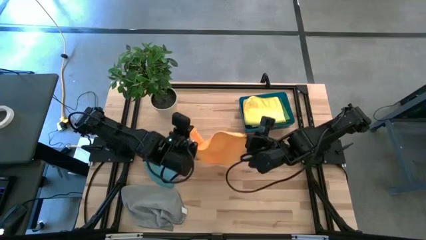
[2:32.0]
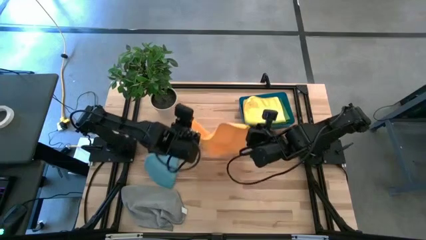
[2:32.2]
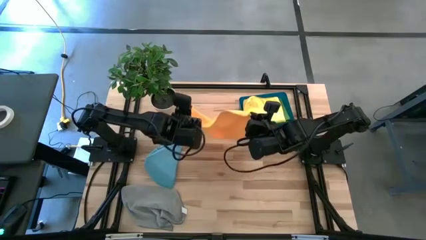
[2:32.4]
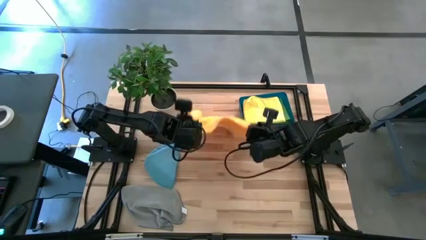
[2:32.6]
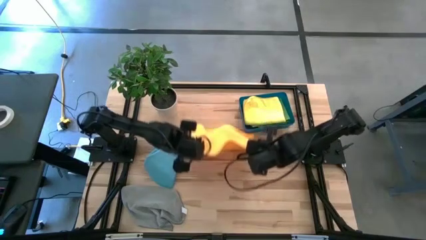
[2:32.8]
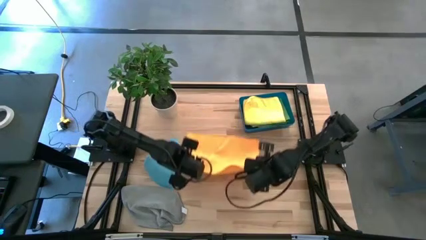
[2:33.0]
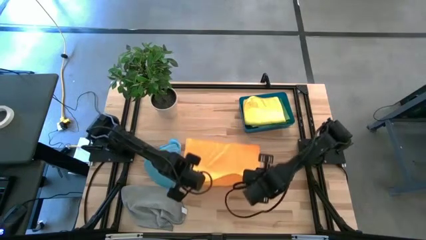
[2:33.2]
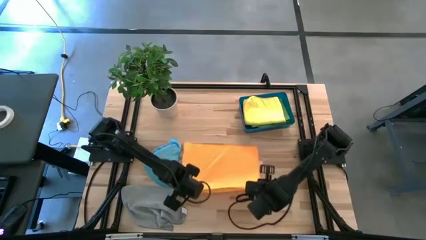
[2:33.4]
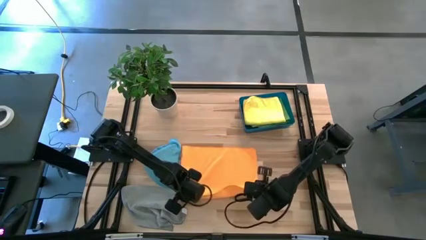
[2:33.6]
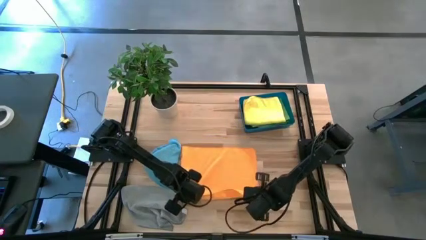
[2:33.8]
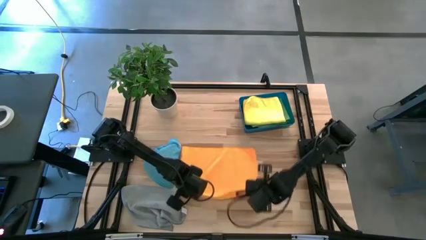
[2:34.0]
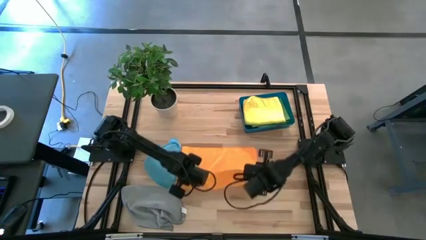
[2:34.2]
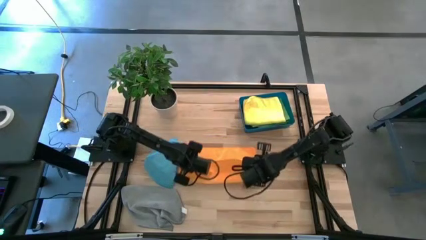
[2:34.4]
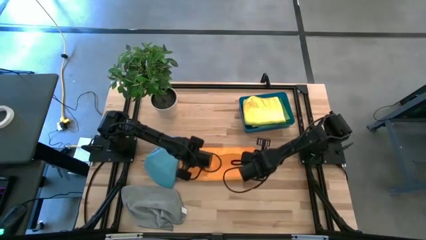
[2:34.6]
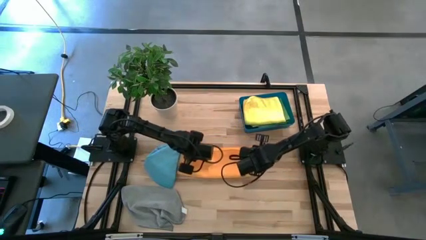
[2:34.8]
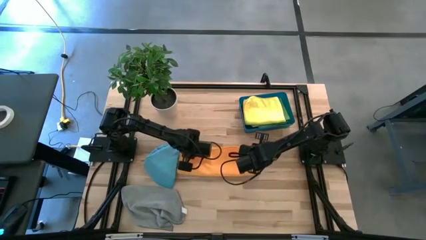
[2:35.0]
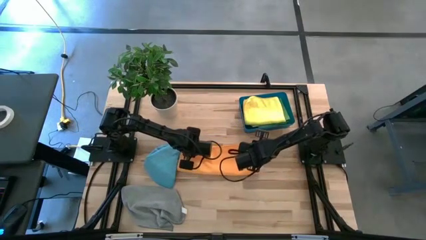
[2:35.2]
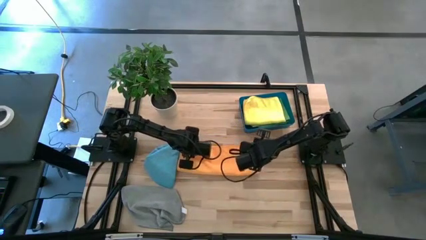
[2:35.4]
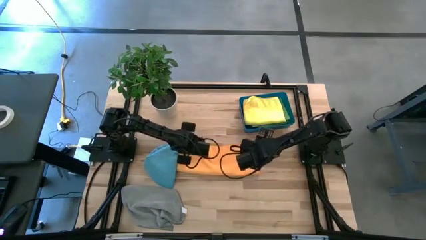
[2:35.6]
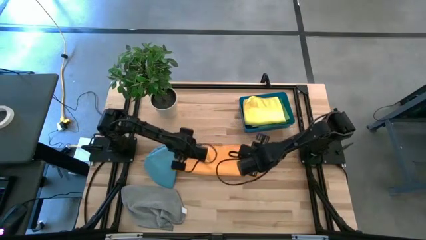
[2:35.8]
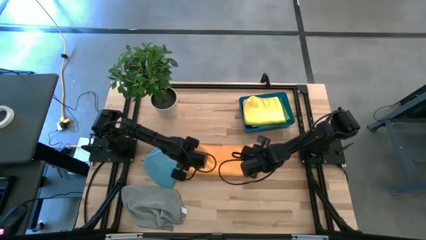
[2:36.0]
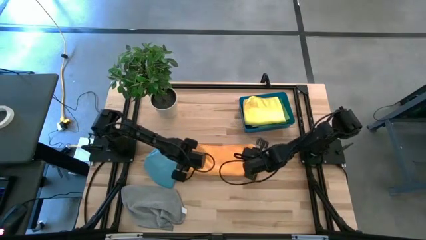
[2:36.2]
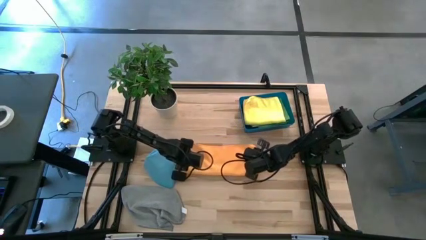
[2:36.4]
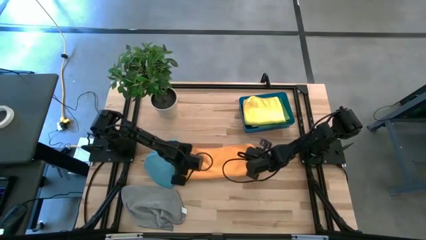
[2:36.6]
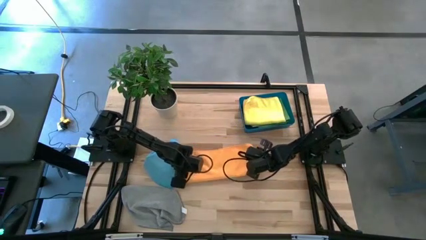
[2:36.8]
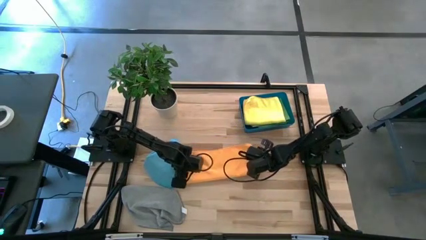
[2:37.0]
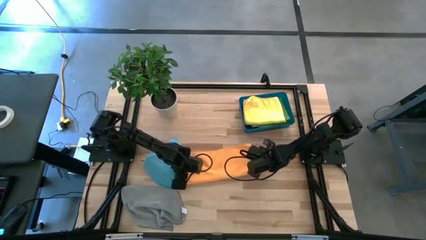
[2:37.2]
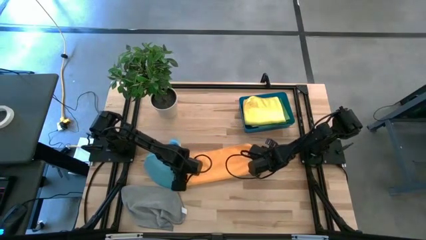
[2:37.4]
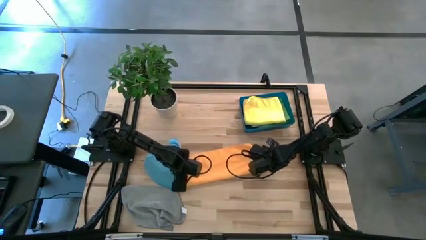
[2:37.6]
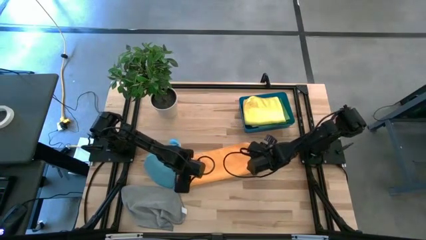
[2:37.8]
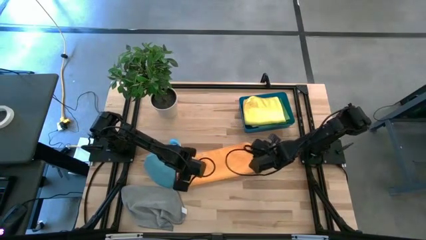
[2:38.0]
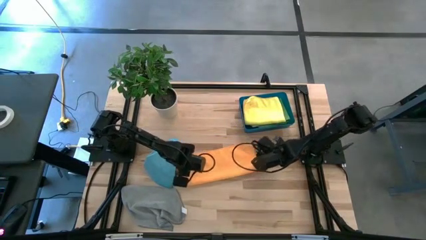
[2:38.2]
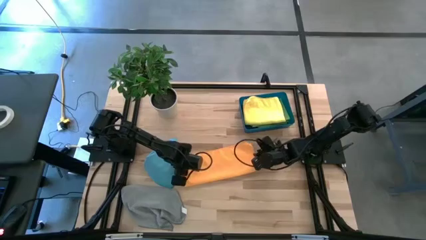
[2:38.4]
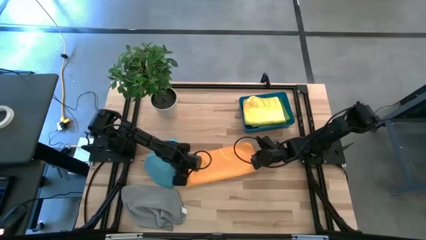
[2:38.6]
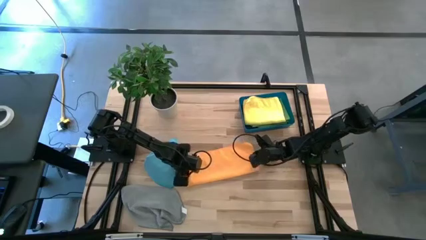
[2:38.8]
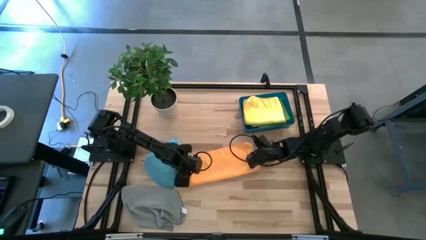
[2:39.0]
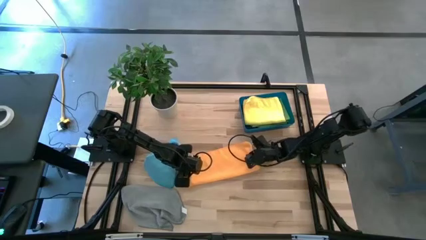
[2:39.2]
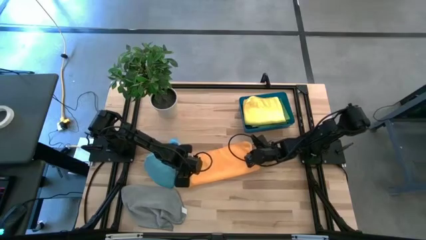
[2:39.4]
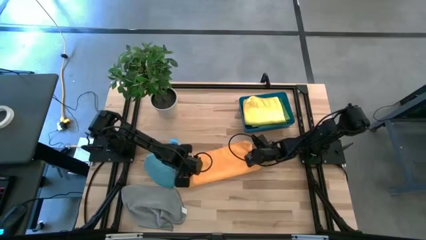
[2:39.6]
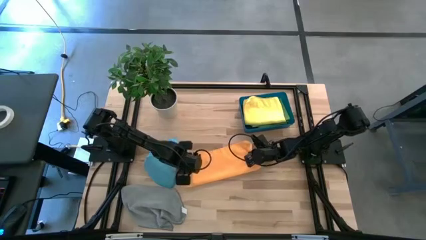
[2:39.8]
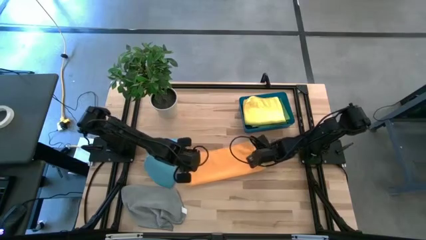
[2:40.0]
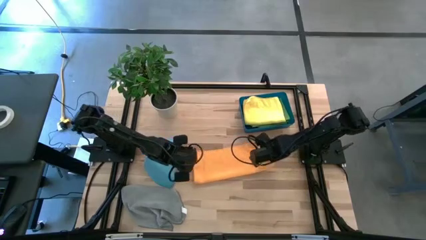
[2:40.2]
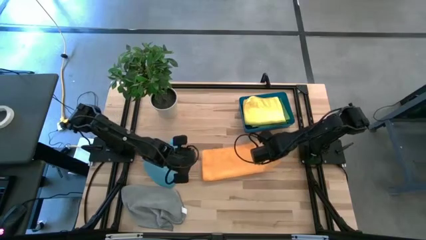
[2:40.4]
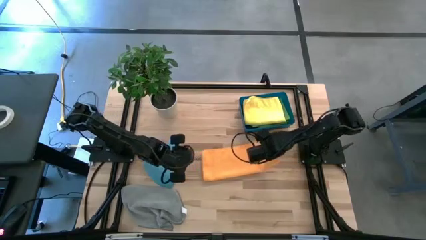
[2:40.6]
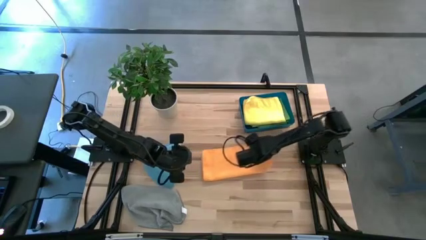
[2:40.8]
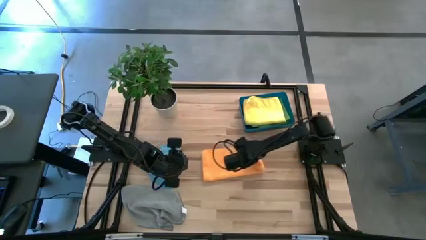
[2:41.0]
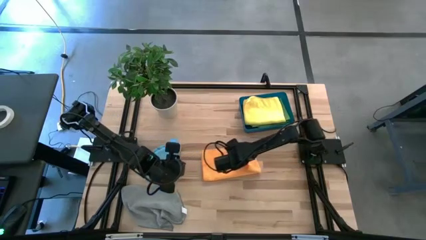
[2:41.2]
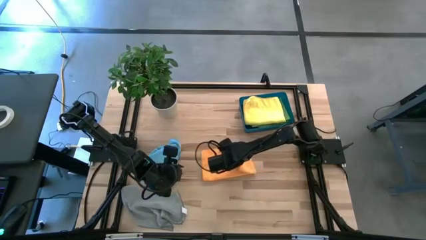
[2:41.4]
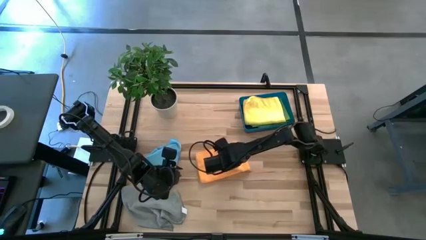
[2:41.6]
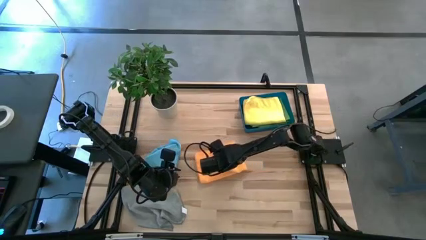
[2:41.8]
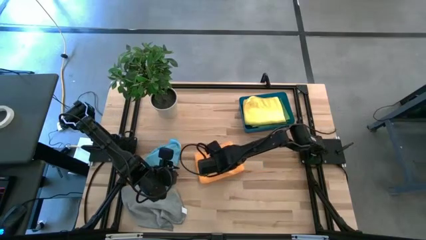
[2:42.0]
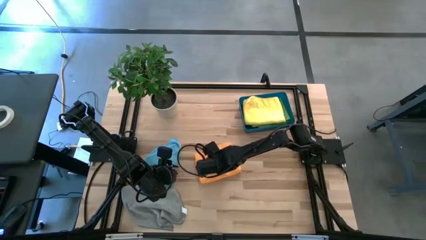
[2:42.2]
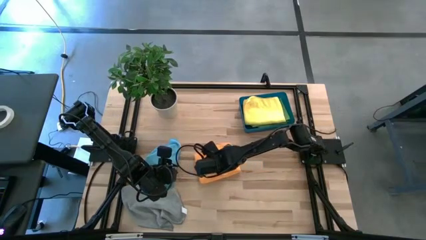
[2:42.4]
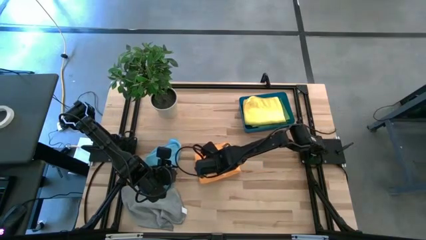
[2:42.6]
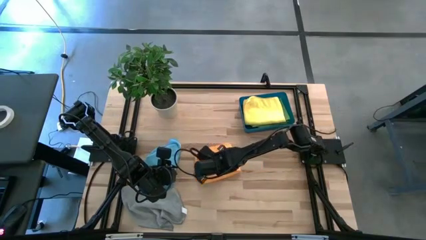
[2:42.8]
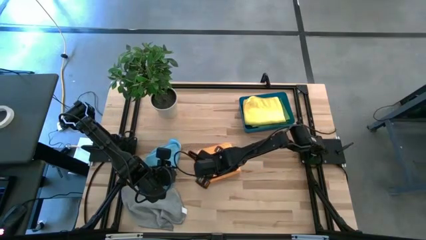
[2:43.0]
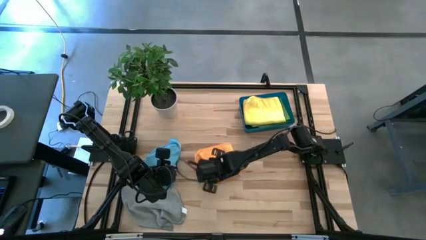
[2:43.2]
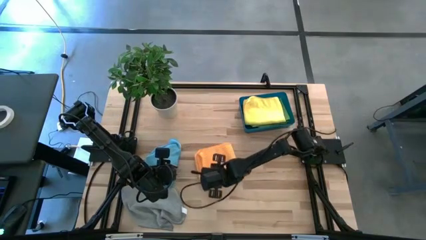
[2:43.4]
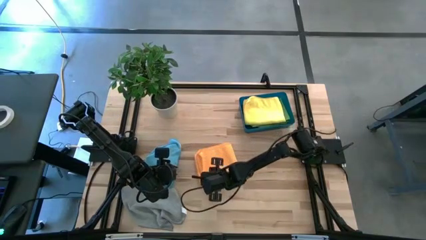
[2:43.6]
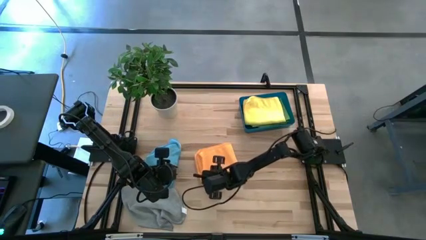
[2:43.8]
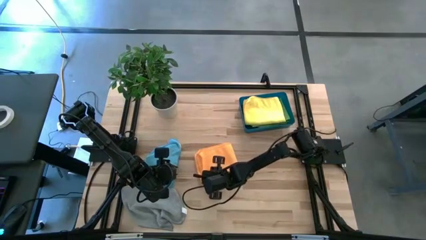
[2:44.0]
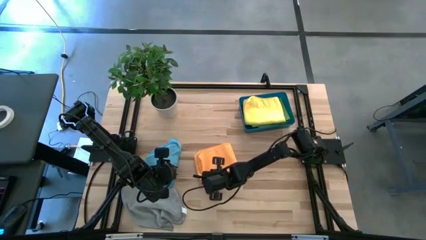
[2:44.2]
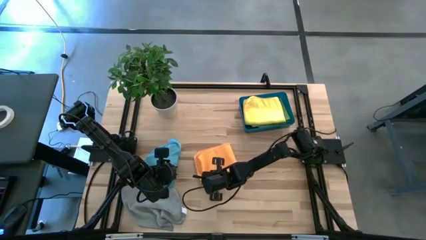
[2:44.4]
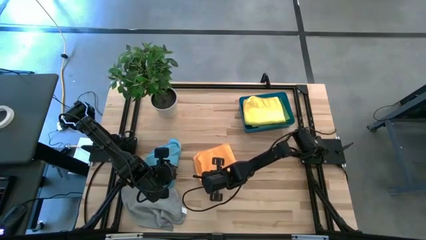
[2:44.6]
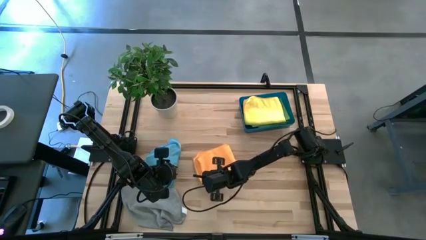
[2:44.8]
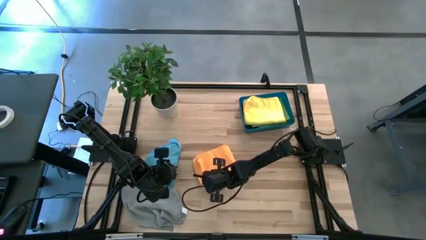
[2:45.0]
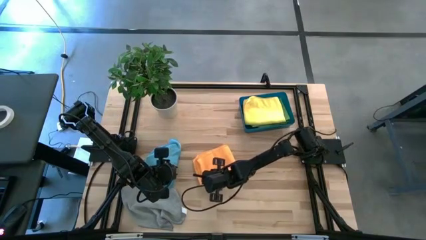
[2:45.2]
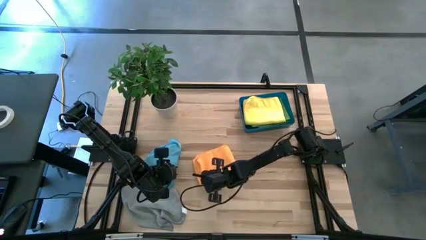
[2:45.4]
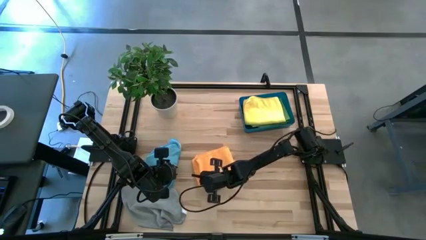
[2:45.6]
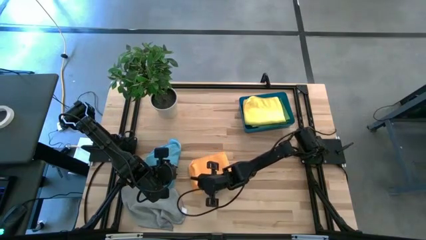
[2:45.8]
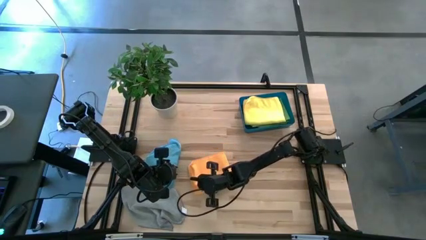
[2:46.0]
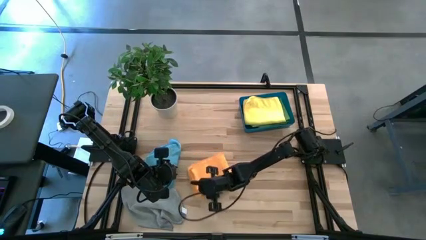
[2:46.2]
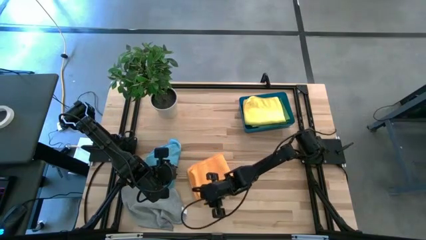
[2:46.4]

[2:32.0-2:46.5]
Task: Fold microfiber towels
Fold the orange microfiber cloth

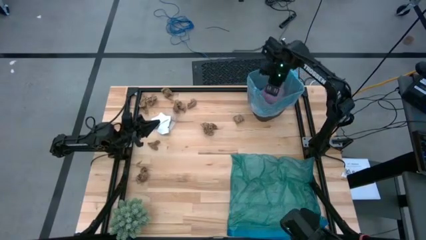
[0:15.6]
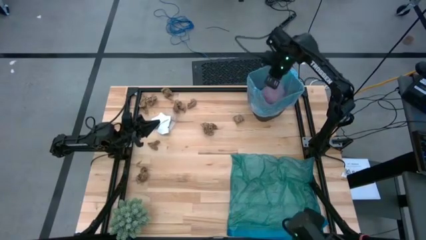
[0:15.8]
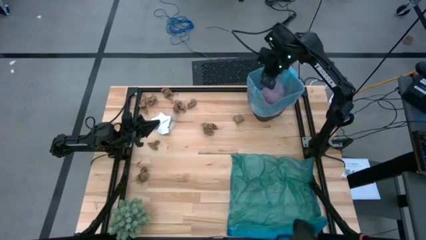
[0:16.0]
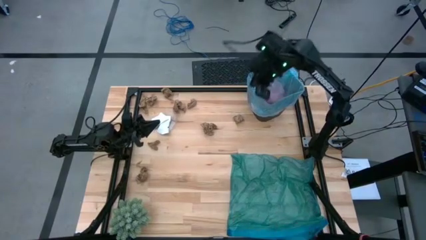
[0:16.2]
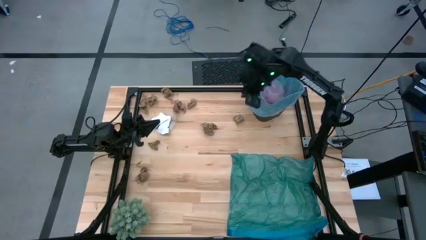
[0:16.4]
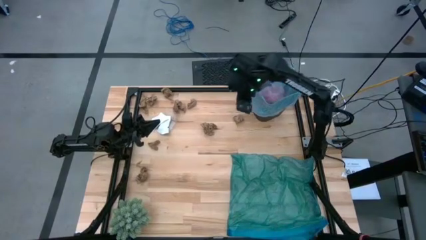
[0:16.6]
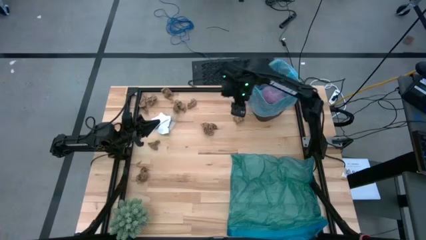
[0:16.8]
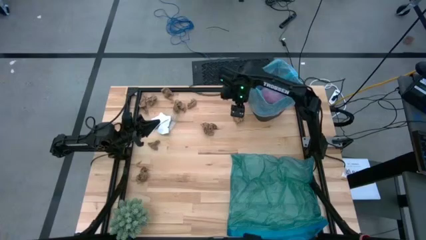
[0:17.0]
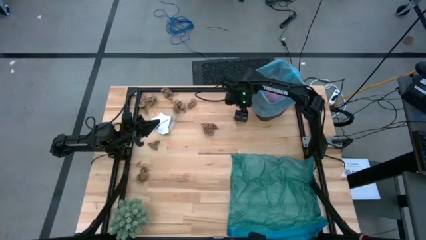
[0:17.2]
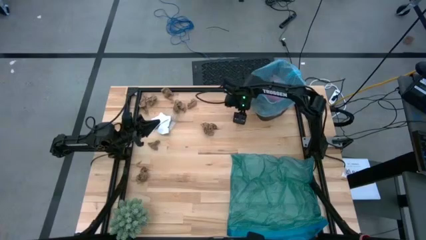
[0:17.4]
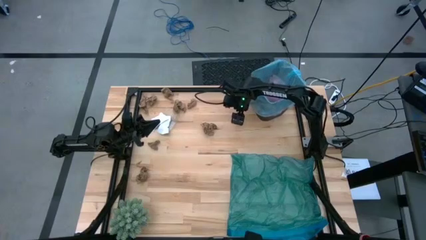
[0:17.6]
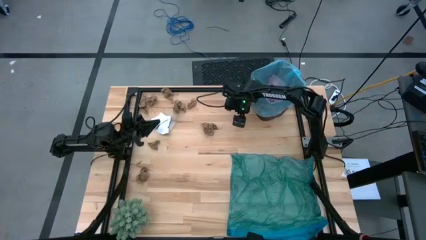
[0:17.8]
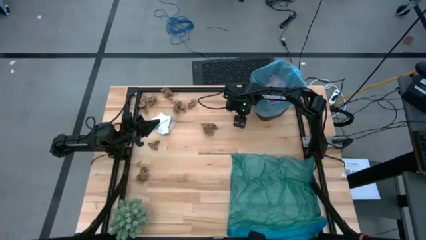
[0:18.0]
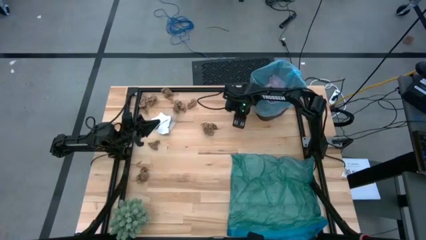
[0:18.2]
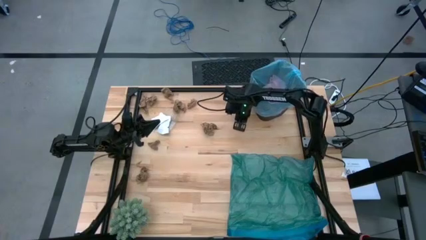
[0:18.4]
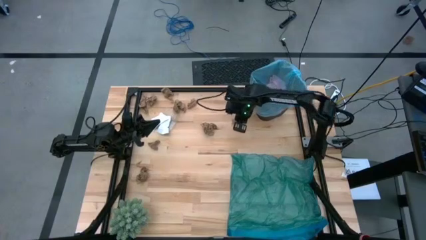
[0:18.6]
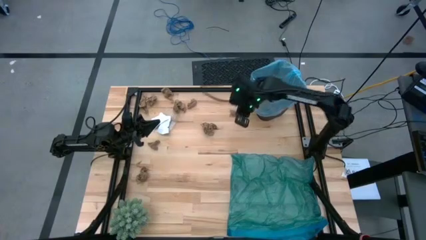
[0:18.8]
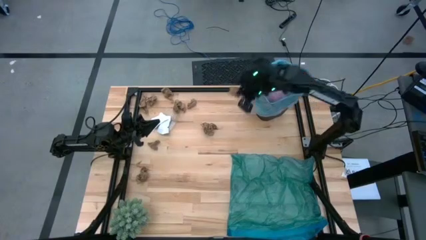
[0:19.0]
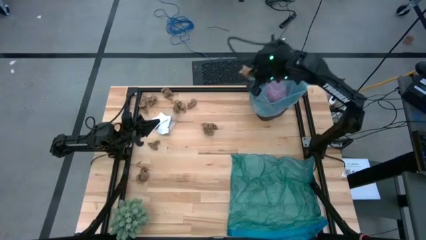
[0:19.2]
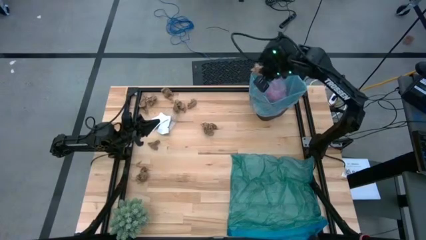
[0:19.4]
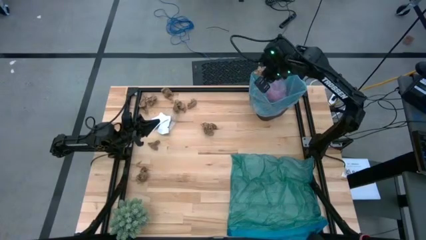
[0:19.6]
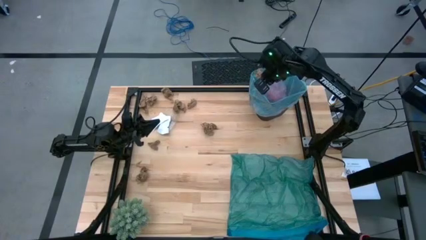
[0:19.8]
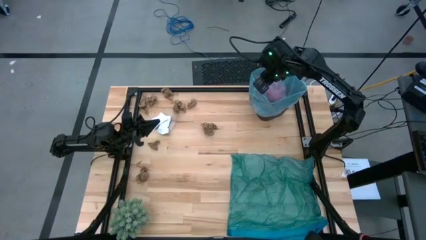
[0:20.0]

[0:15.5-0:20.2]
Task: place trash/remove bag and relplace
Put the brown napkin into the black trash bin
